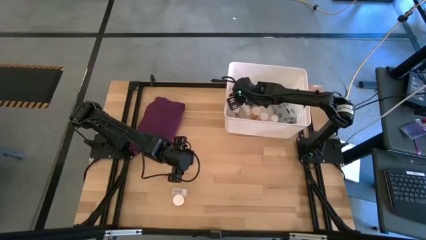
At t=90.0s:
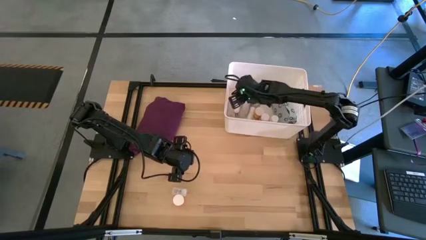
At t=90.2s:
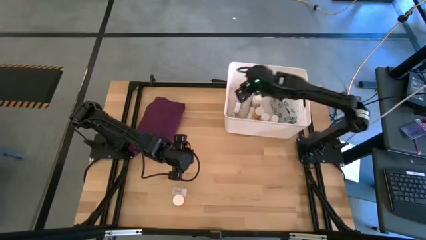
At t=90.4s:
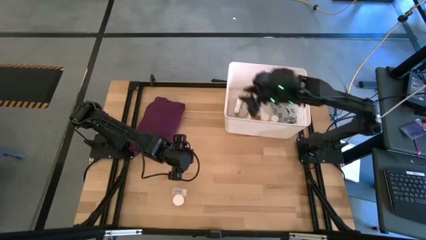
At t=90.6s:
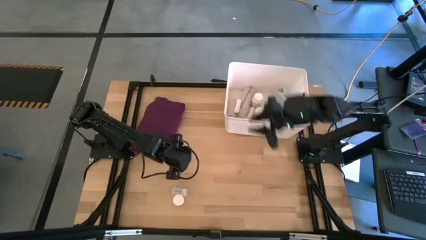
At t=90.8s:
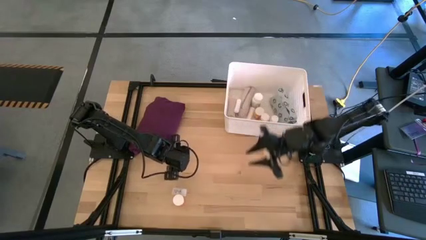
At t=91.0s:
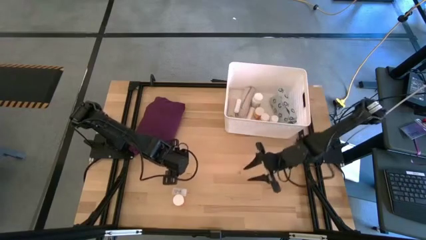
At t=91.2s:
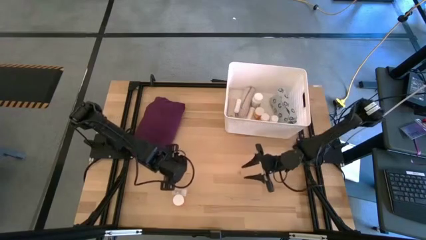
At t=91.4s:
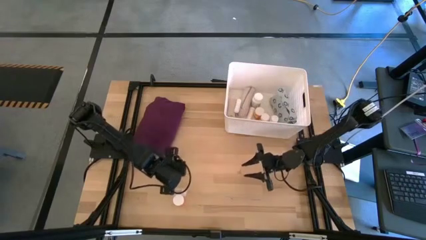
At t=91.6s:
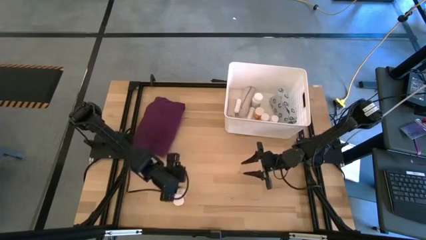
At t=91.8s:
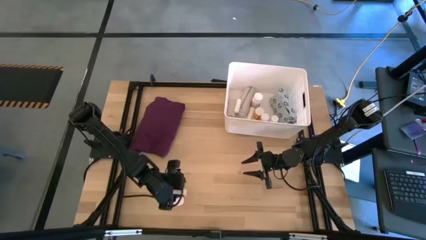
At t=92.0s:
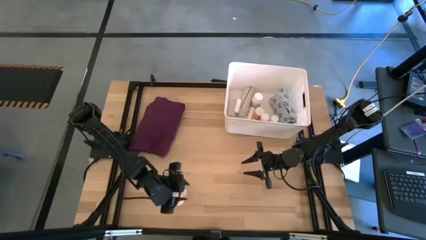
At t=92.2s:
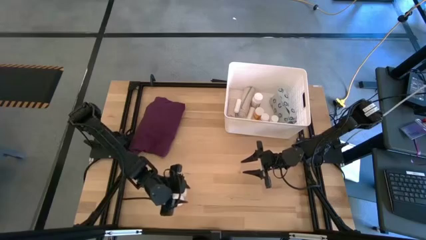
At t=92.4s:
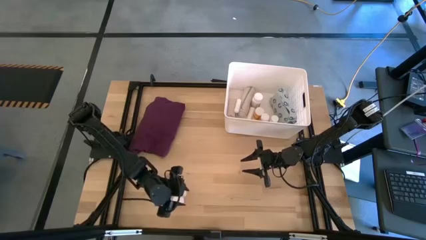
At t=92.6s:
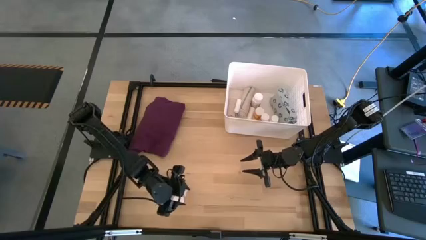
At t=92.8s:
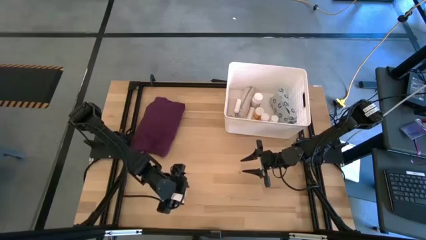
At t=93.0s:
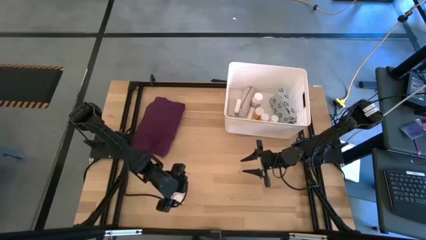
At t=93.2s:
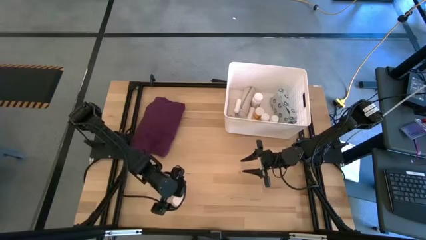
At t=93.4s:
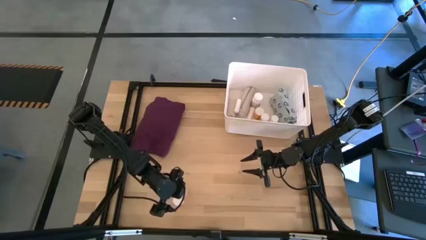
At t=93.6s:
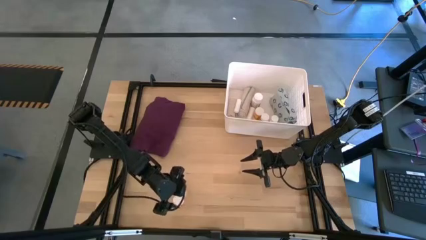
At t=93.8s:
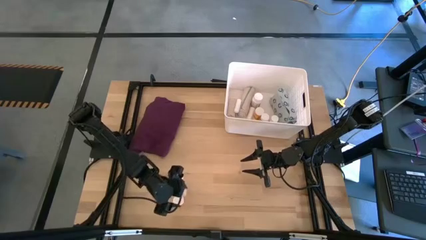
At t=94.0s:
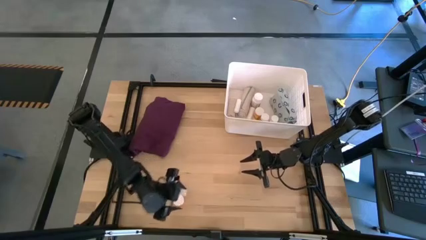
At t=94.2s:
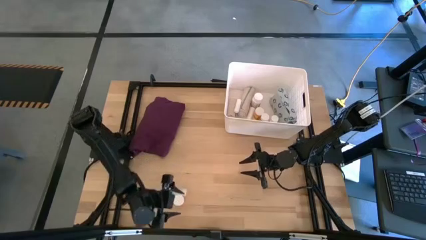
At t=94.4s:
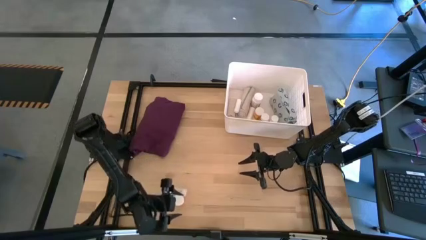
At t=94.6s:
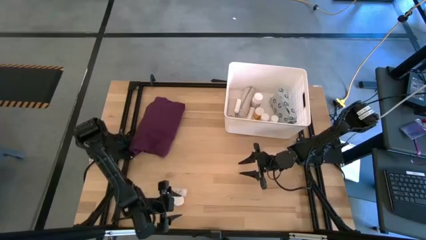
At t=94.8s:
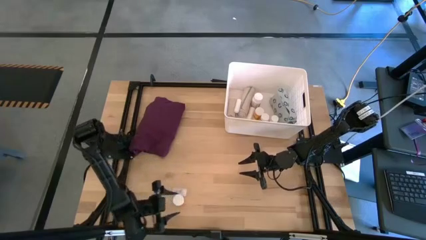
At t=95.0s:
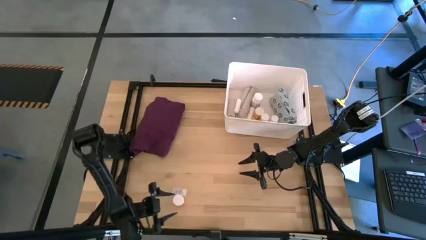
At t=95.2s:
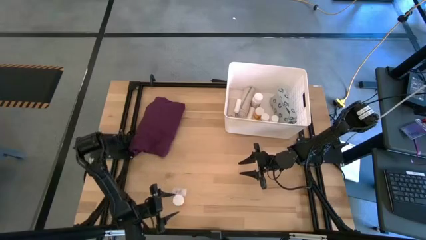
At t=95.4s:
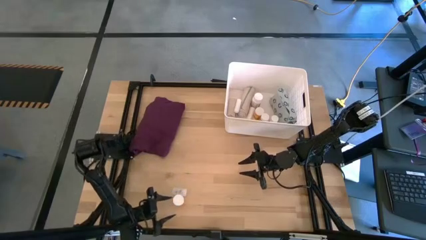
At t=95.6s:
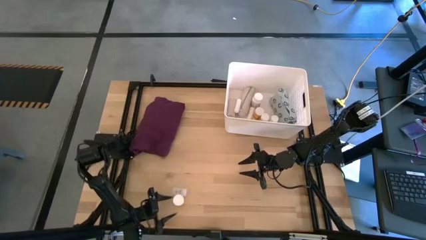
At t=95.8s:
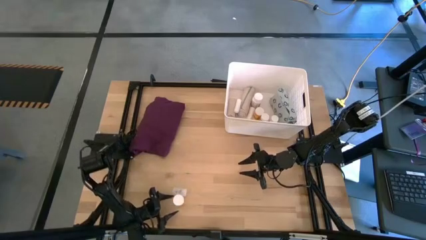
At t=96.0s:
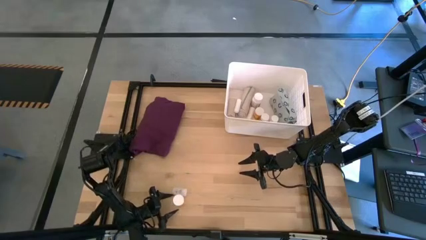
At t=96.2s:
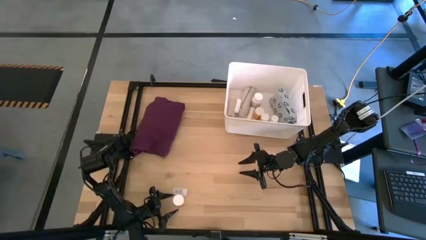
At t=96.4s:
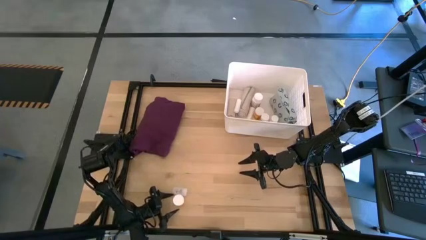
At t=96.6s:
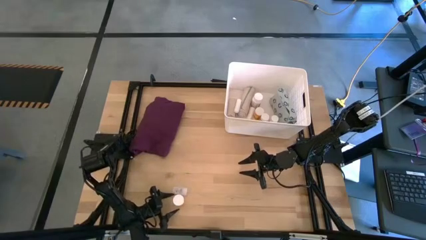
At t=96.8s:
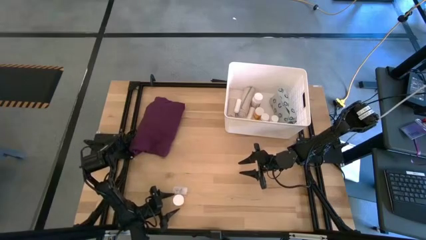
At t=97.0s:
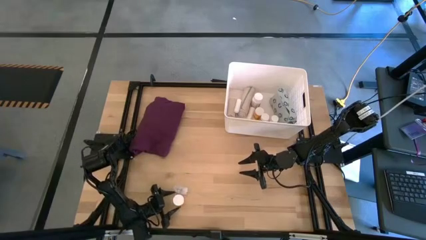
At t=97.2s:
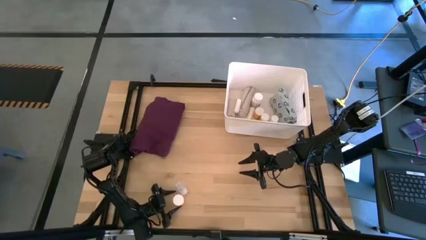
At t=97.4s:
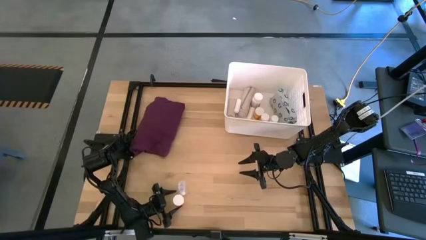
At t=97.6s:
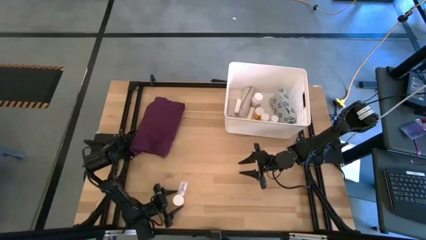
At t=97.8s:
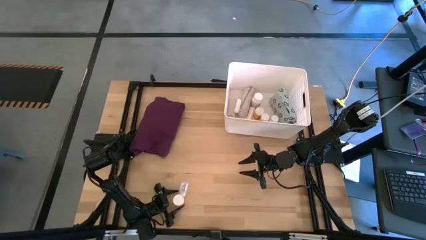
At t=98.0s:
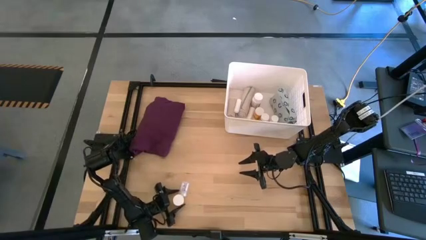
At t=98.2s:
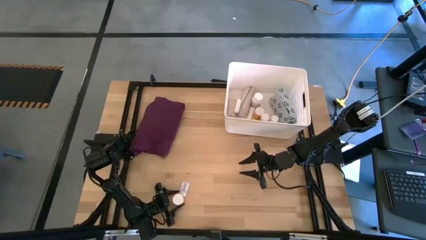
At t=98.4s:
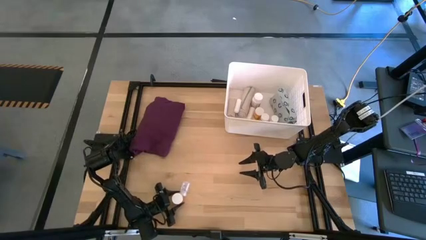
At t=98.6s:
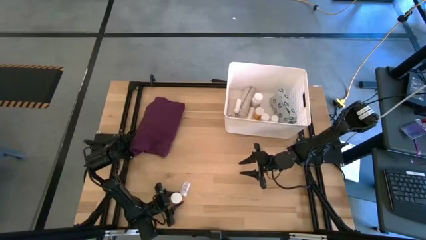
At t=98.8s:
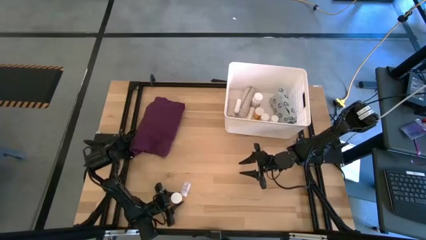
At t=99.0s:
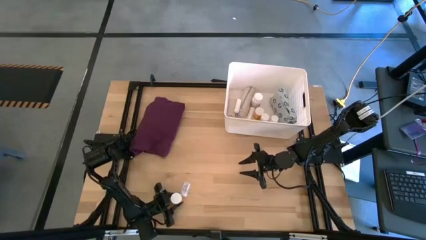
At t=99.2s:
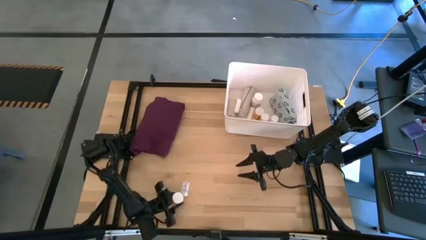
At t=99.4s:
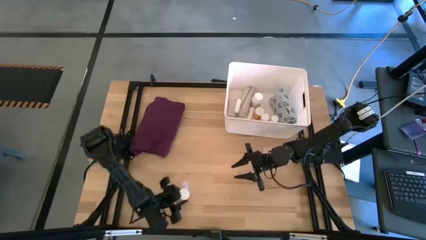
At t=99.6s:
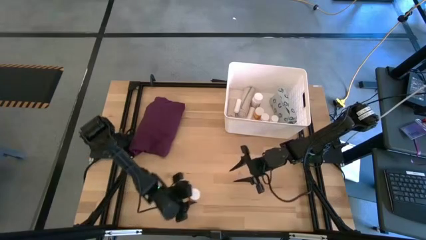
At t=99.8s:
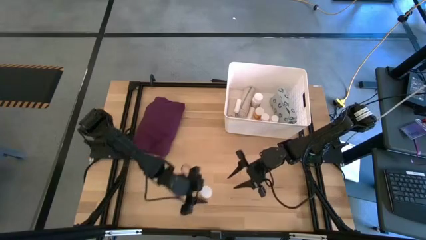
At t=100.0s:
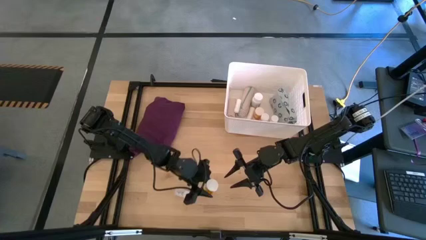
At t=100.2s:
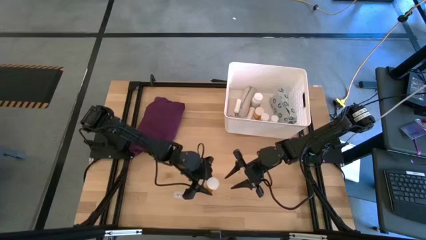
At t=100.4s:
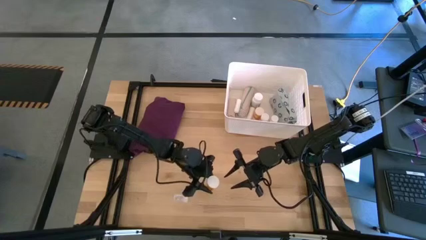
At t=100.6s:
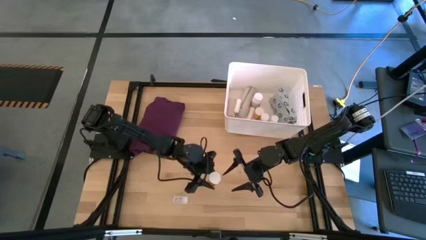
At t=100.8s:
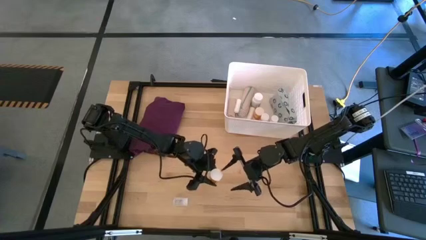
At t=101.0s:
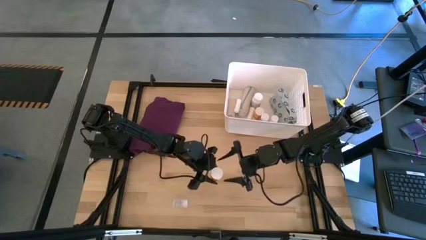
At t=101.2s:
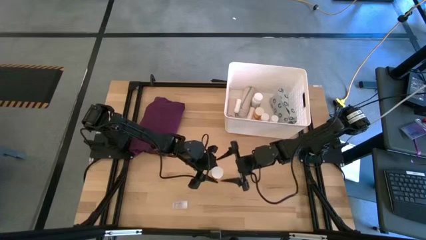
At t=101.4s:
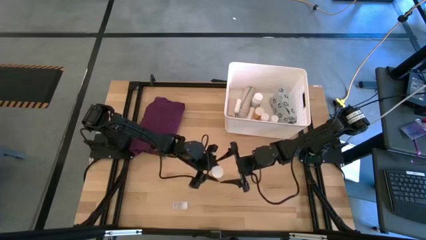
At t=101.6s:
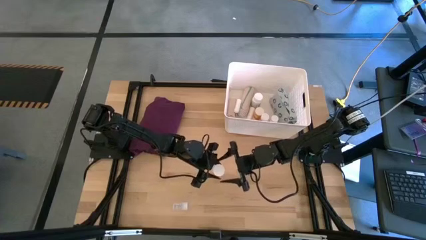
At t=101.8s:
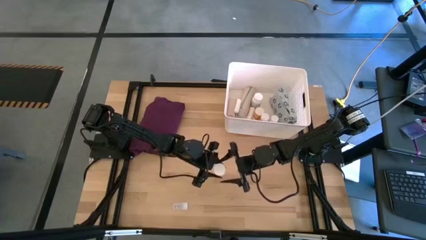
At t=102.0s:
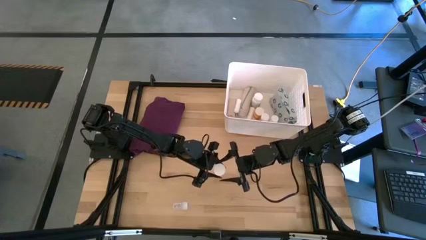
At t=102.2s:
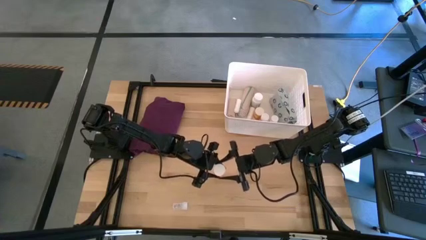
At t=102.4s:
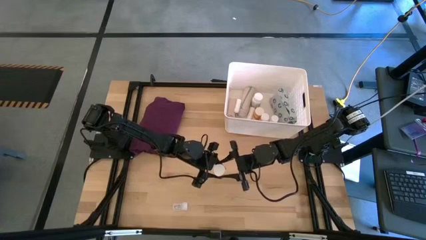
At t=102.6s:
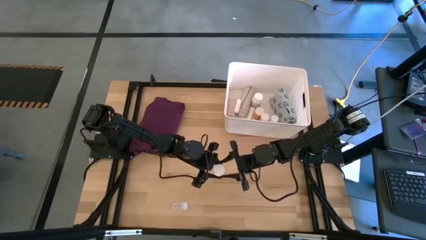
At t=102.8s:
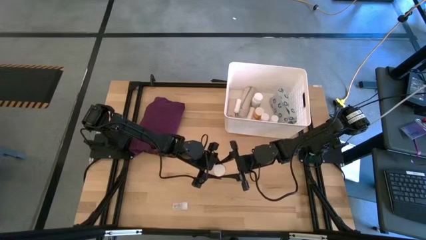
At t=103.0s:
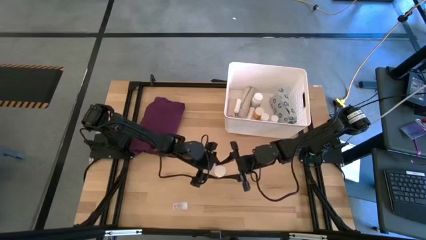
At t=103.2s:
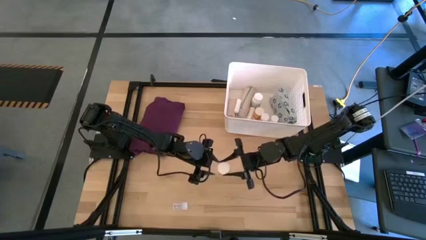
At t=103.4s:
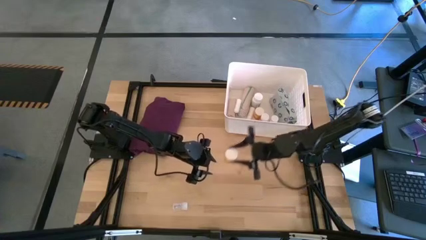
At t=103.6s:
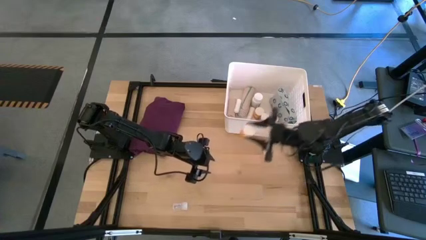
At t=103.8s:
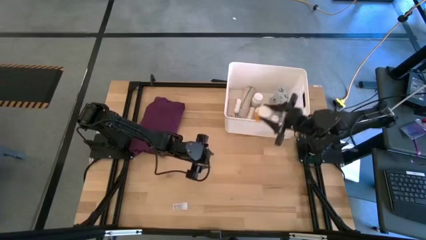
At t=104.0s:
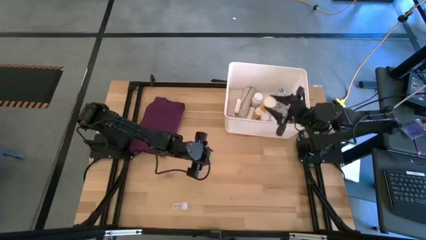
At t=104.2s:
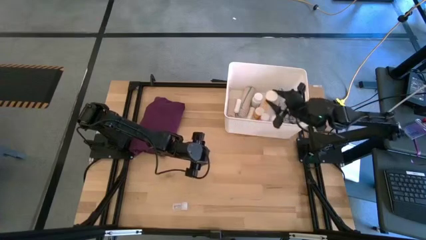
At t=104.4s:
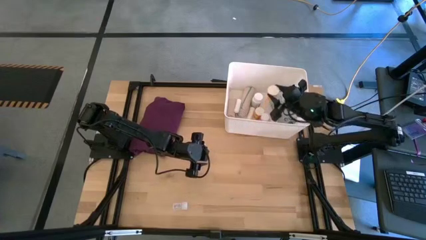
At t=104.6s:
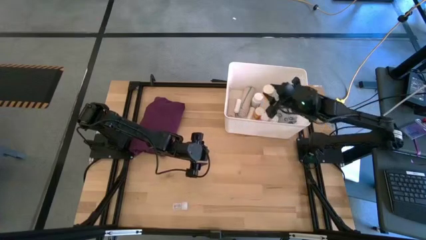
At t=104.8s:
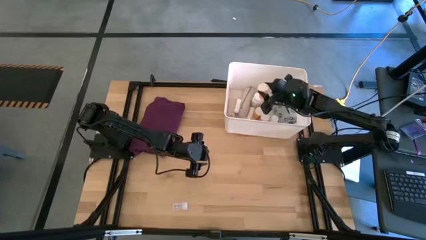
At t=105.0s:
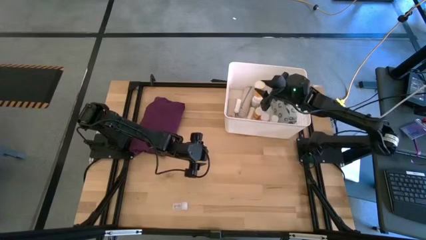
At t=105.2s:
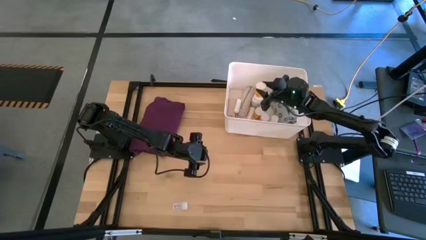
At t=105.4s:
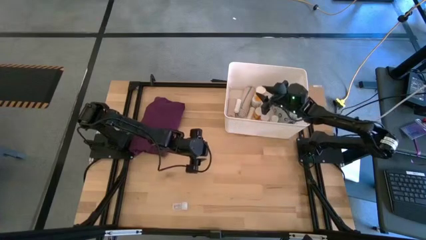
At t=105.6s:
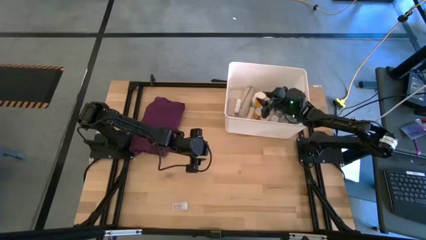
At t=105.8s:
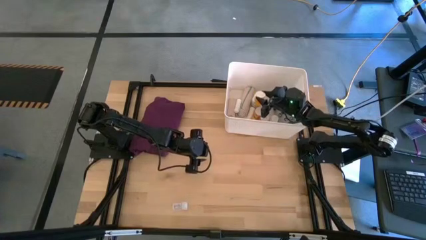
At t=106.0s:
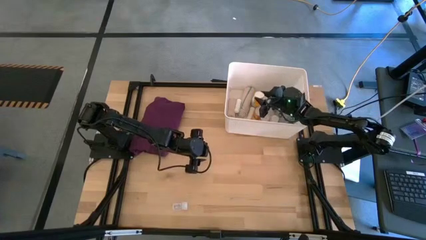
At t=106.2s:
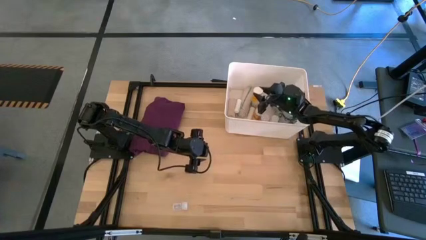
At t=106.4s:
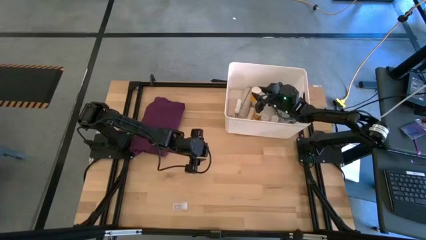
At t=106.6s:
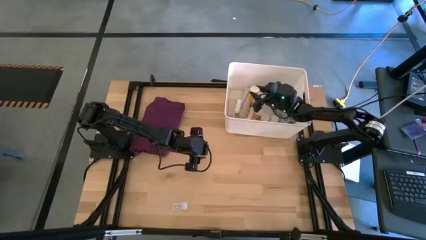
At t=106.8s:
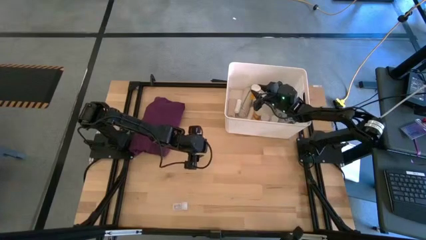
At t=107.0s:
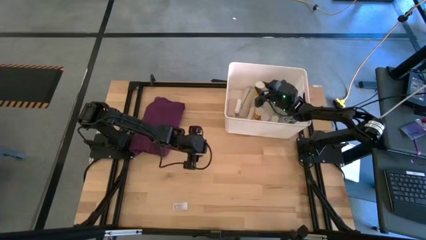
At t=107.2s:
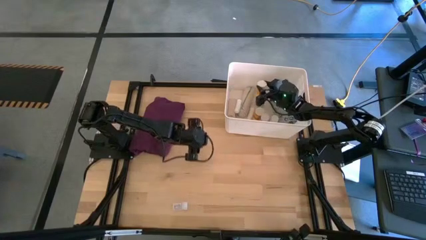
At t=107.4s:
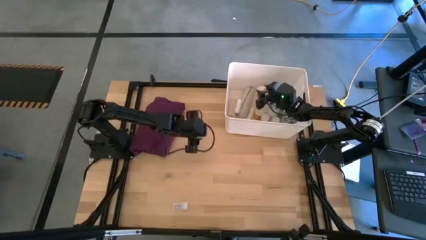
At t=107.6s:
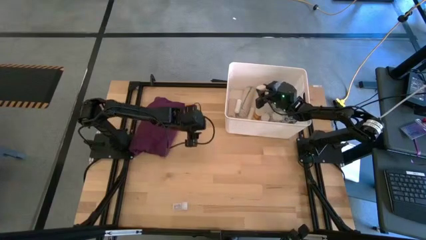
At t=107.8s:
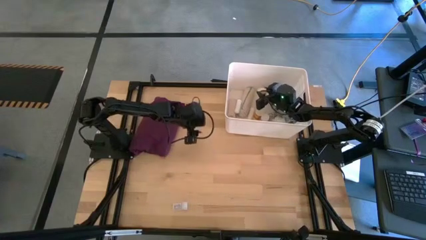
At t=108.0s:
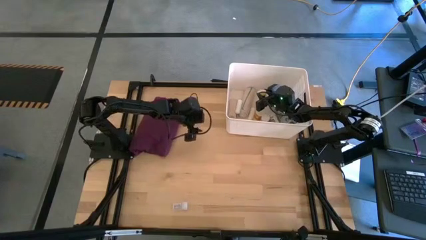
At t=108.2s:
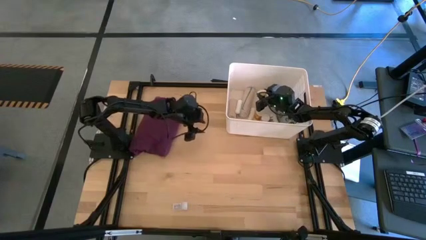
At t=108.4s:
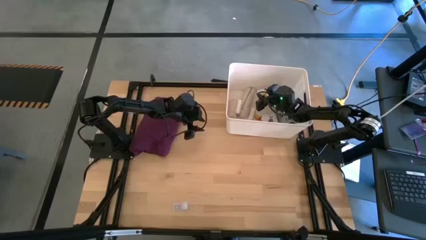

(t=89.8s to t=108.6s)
Task: Pick & place medical supplies in basket/bin
Put the orange pill bottle into the white bin
